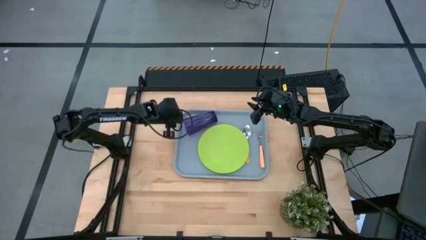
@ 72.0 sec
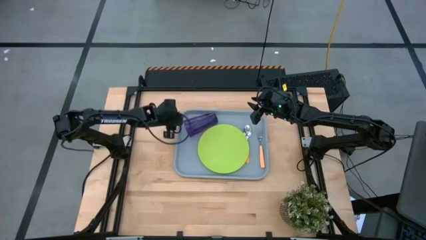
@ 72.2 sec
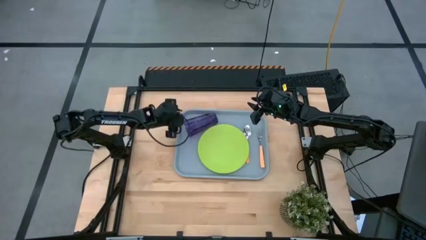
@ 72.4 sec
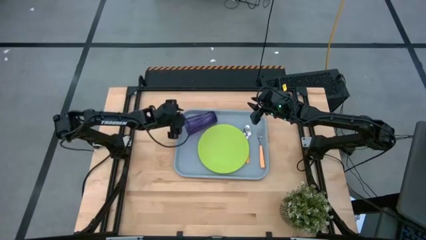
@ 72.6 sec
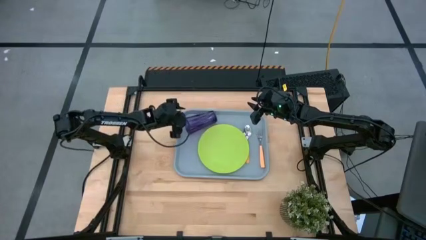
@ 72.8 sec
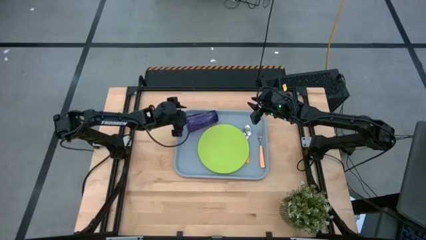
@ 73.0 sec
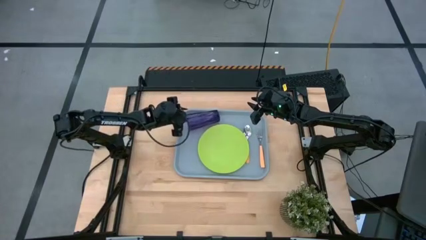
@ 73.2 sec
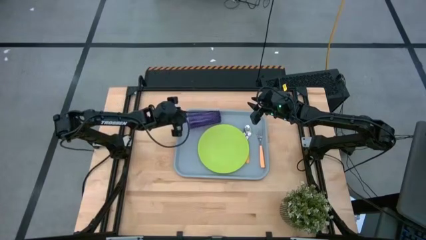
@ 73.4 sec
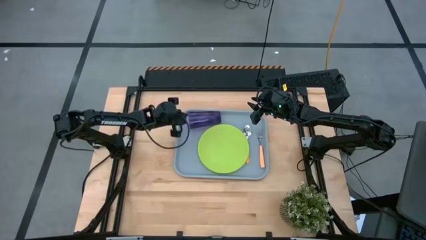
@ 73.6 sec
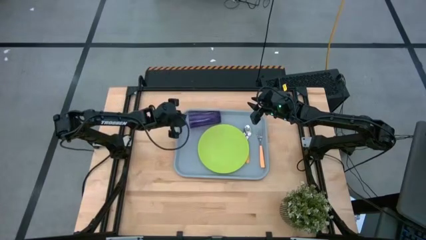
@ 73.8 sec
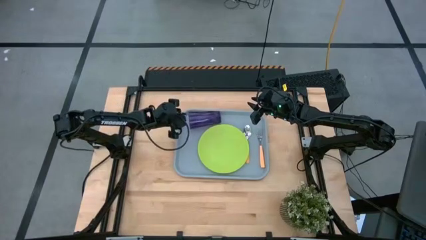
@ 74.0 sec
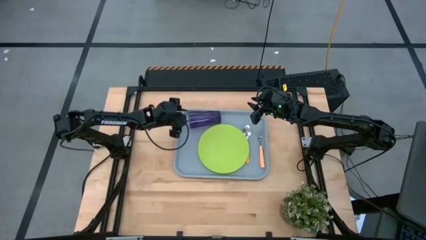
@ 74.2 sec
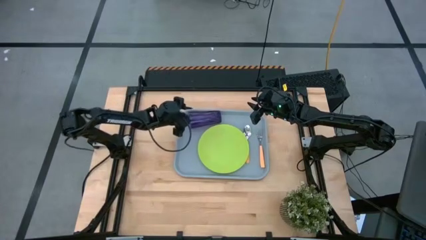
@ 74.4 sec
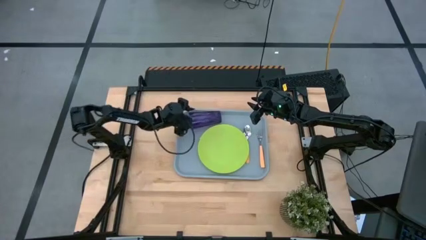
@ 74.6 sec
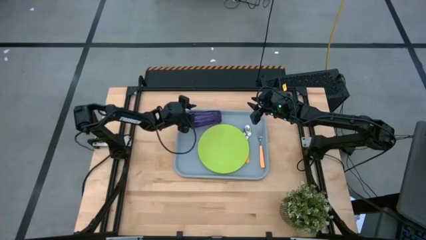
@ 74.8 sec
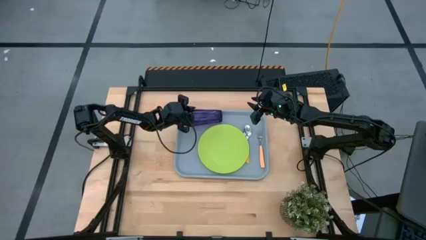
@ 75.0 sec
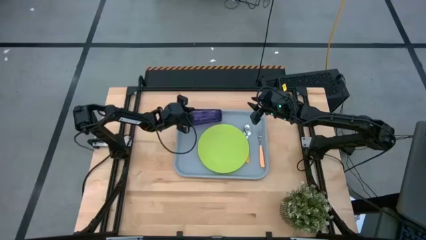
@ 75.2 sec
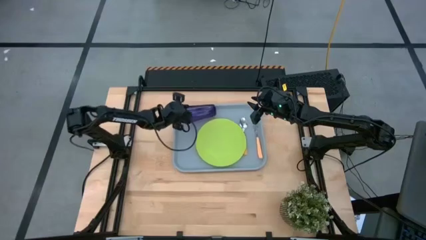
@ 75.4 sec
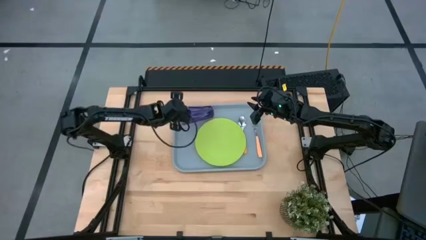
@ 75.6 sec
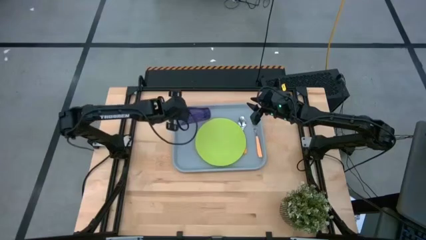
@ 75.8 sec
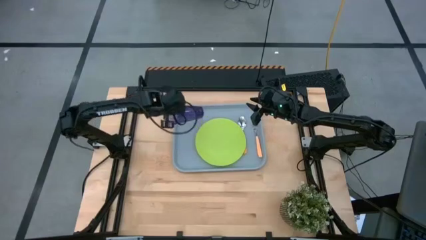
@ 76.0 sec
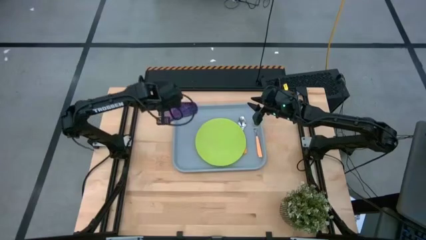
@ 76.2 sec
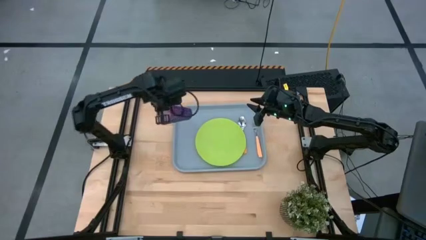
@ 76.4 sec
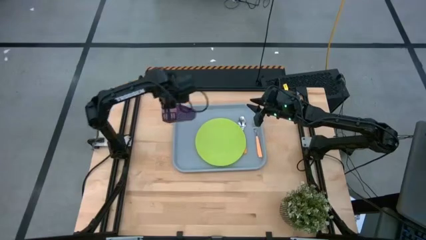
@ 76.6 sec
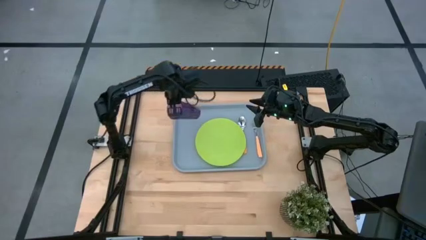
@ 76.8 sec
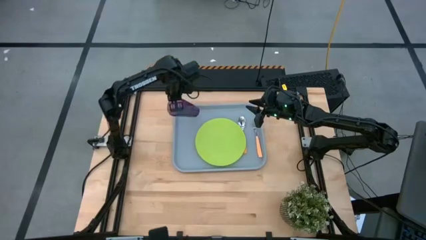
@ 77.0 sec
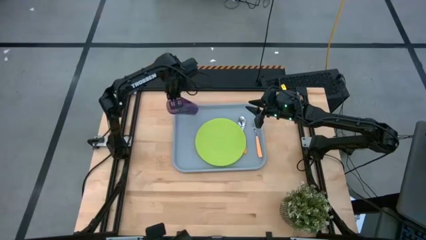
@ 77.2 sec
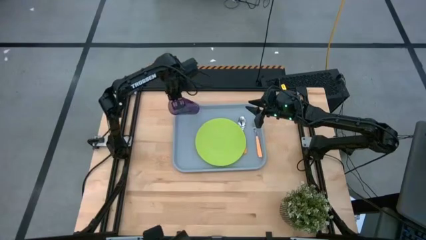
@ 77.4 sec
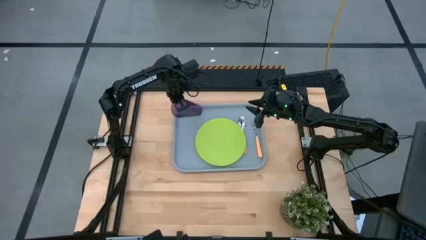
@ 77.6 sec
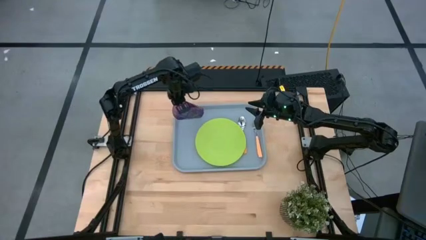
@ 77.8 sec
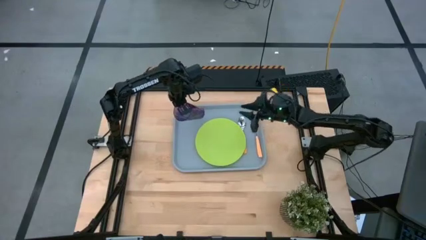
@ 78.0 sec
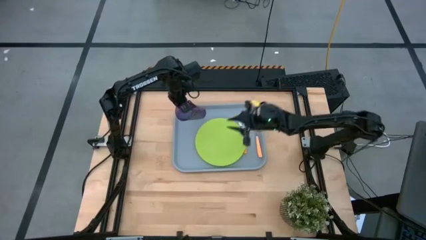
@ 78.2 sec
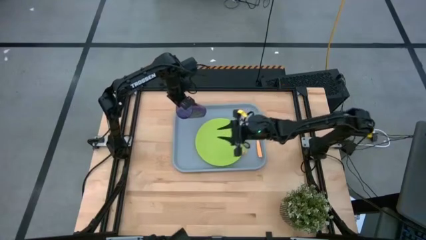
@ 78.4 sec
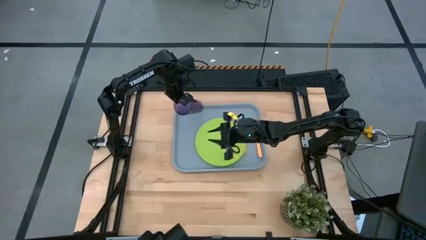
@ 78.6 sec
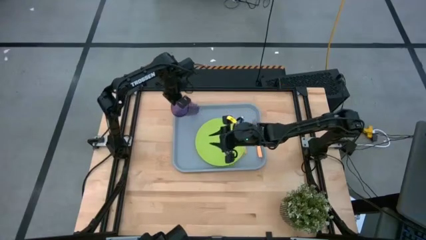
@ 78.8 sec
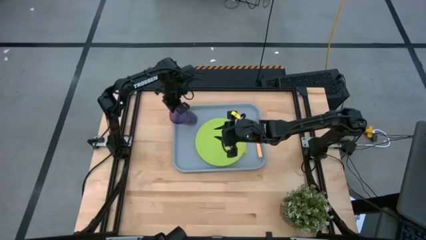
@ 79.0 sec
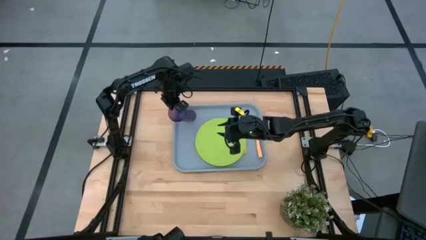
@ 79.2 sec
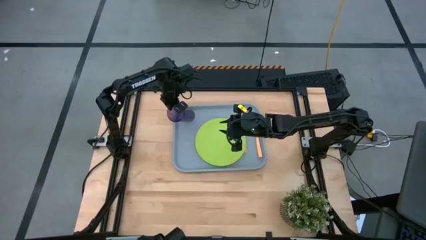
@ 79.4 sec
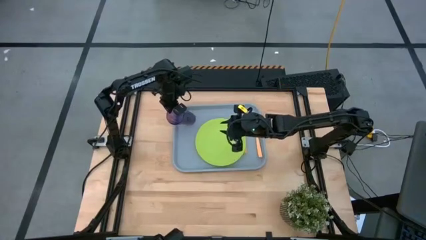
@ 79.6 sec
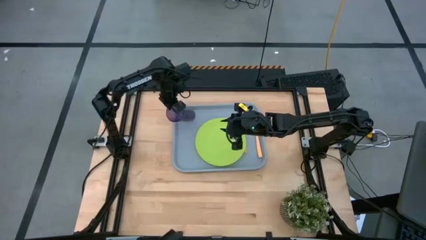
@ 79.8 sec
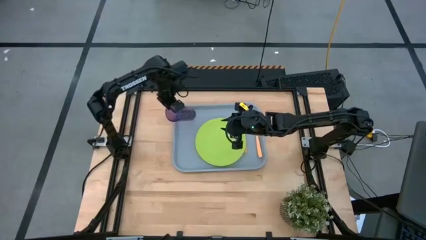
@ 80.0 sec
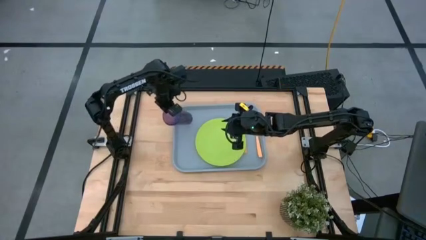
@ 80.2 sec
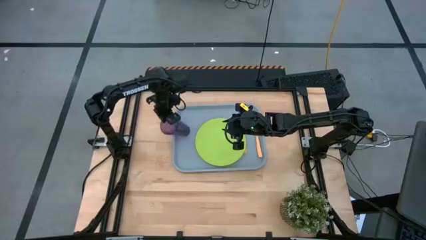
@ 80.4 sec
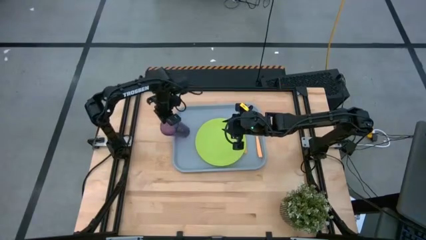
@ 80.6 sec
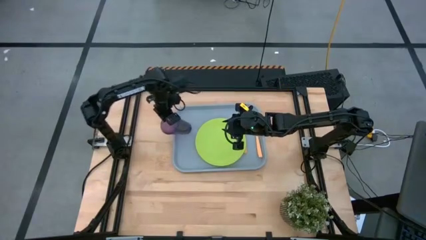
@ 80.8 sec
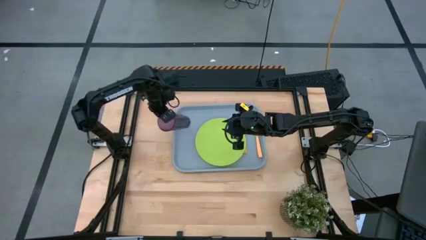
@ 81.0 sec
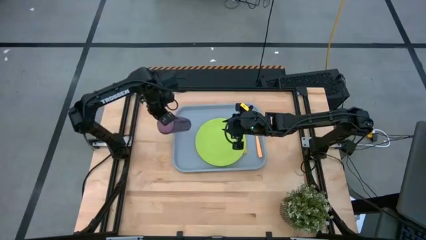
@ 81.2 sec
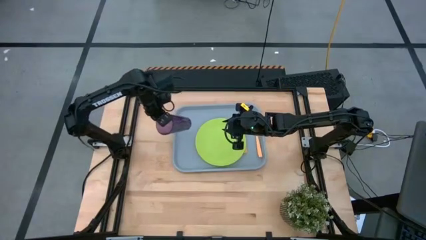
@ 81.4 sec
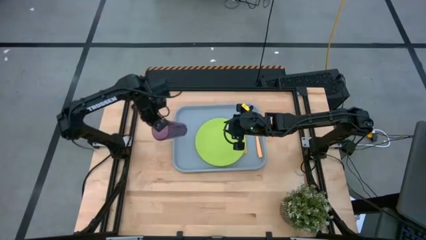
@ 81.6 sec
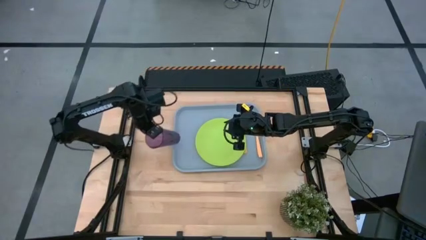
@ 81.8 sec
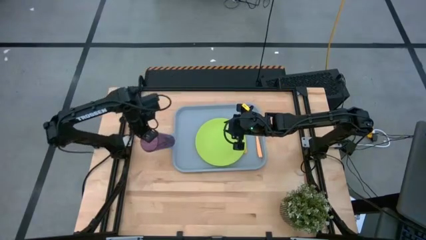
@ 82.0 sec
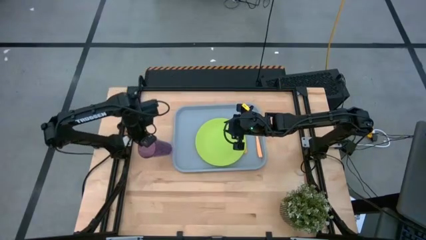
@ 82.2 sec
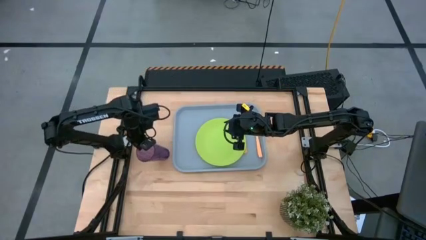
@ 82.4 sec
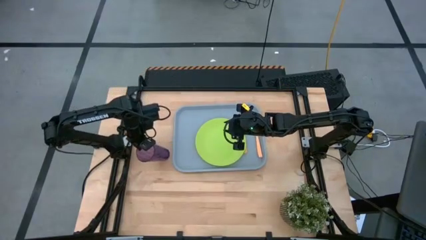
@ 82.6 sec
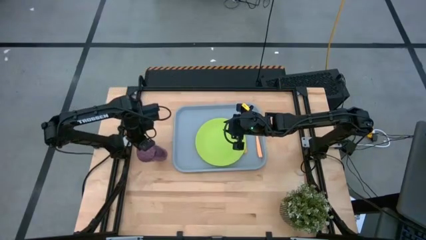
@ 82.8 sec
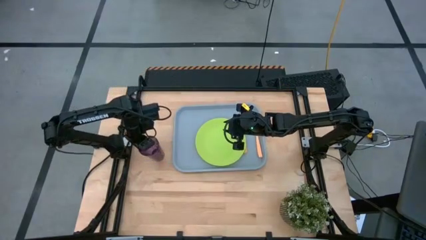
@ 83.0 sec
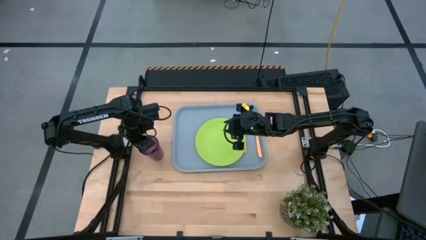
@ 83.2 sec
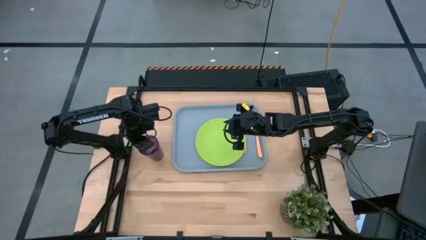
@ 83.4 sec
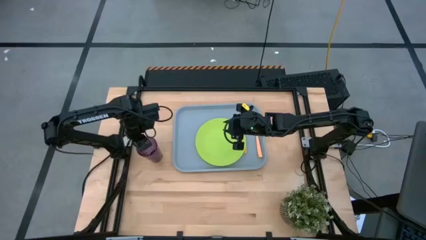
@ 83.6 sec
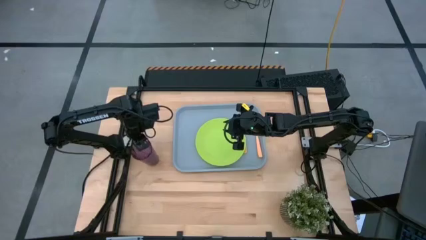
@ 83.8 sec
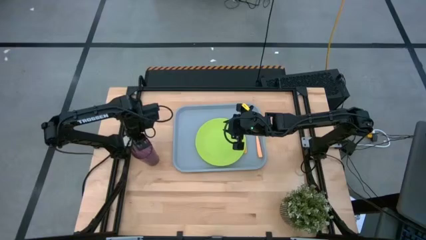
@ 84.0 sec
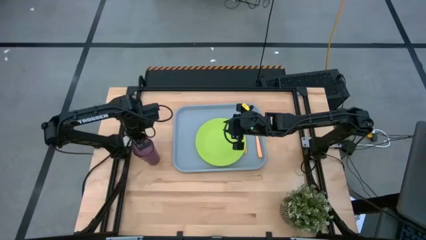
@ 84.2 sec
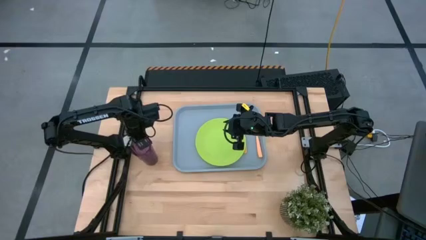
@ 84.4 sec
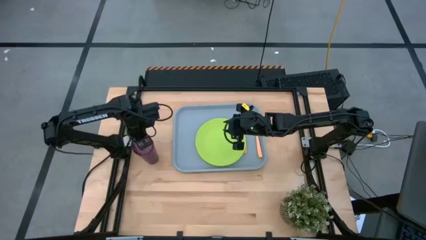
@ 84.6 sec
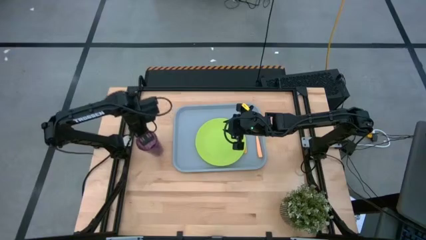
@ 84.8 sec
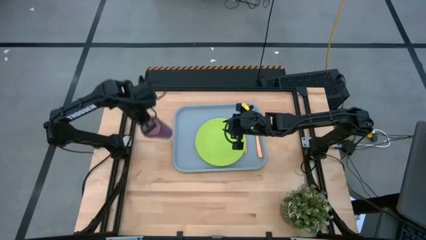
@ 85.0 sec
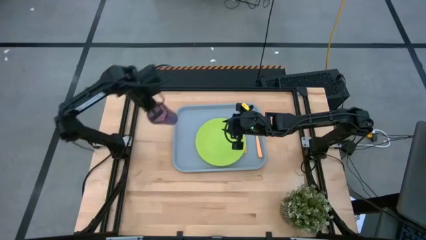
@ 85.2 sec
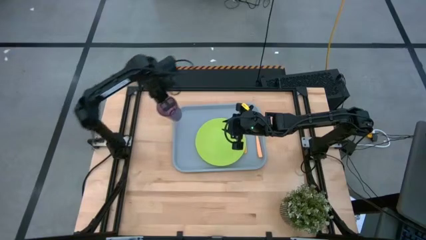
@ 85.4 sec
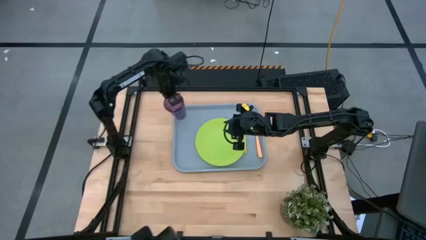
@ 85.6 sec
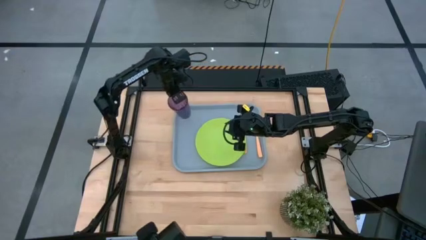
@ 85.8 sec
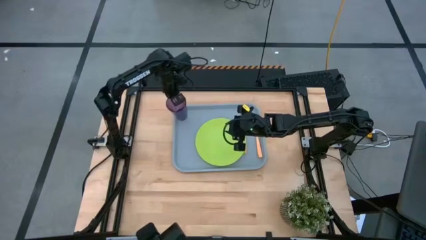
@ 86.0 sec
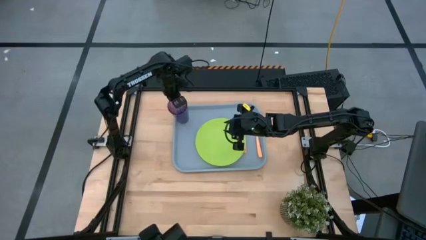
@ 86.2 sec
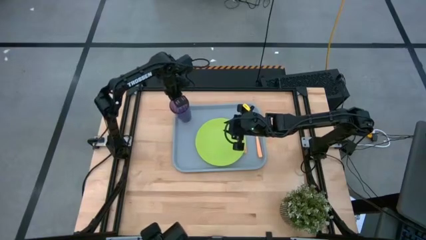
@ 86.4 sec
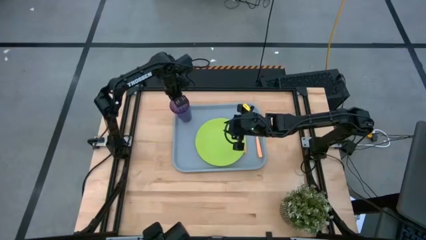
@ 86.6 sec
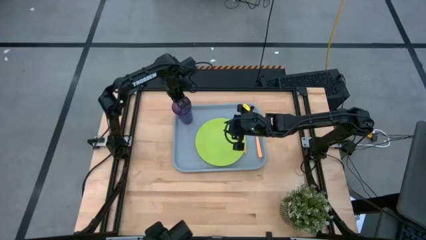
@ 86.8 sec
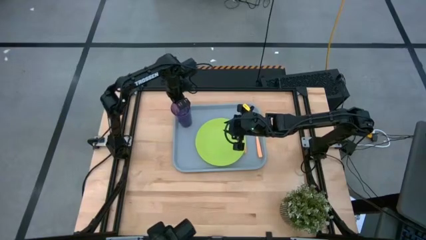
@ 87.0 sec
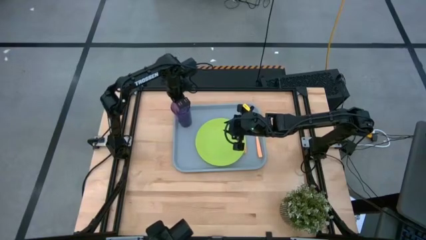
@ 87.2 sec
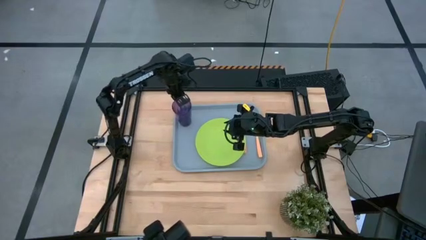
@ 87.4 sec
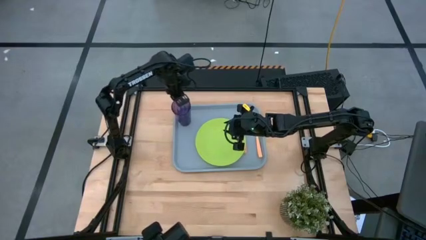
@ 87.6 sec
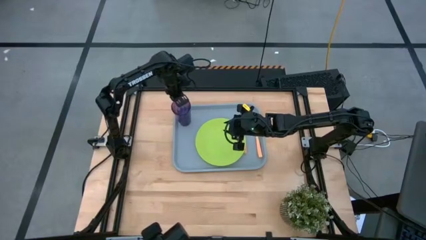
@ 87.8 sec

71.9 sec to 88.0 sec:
Task: Pick and place plate/cup/fork/spoon on tray
Put the violet cup on the gray serving tray to the top left of the green plate
